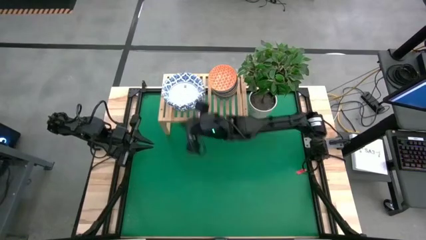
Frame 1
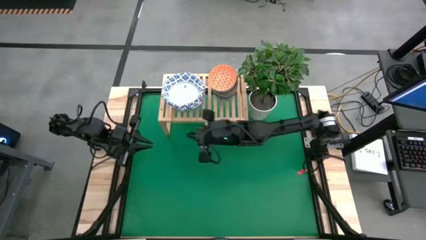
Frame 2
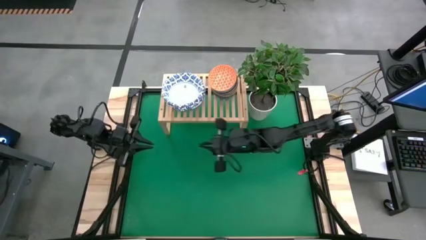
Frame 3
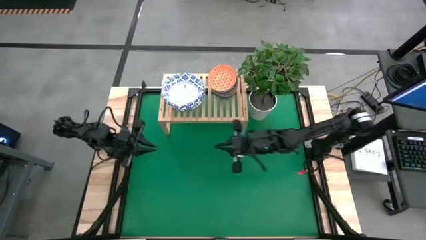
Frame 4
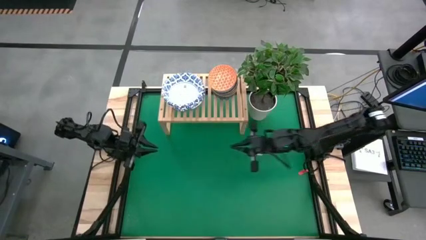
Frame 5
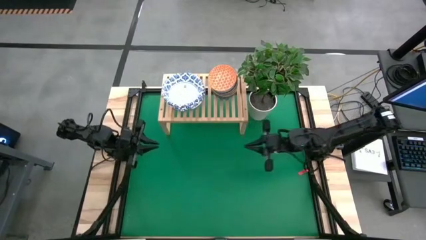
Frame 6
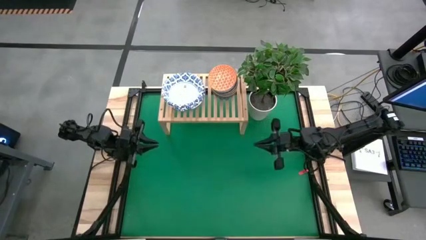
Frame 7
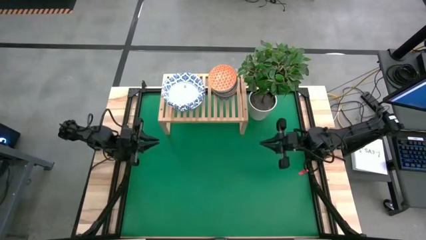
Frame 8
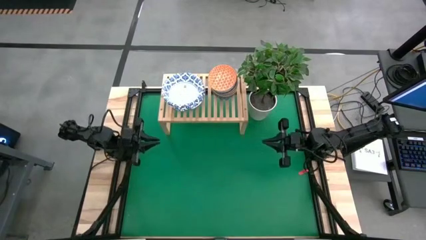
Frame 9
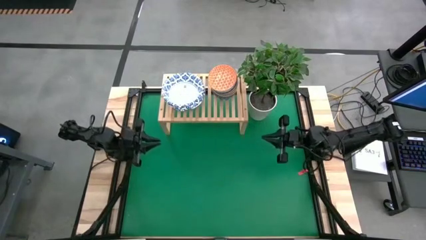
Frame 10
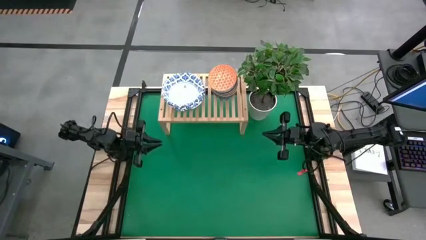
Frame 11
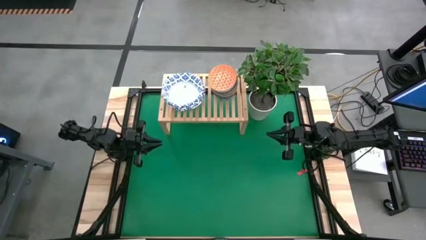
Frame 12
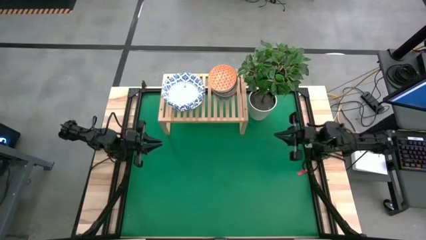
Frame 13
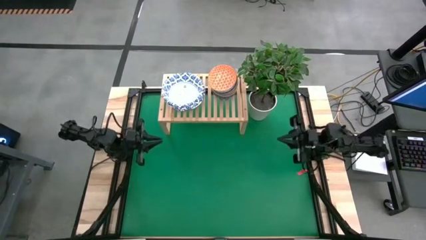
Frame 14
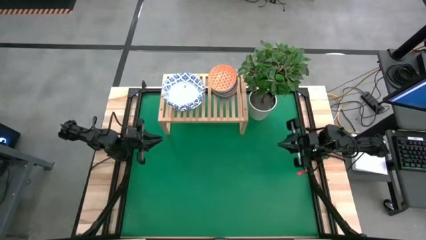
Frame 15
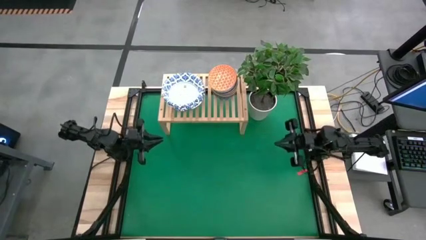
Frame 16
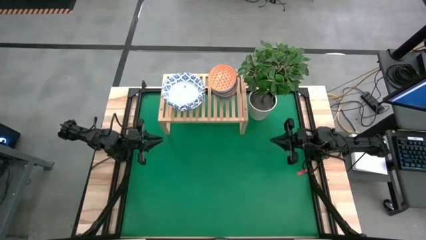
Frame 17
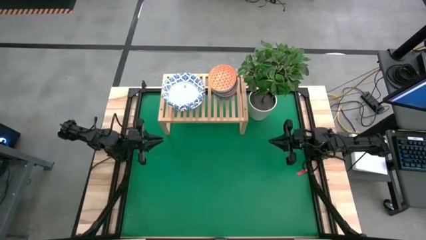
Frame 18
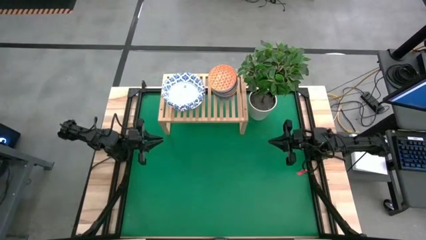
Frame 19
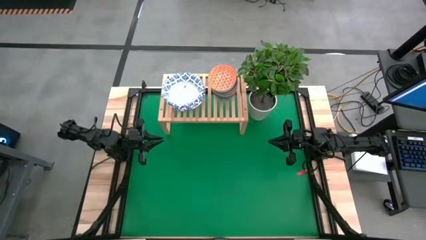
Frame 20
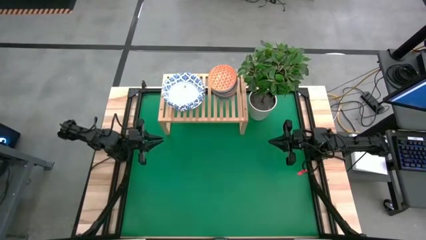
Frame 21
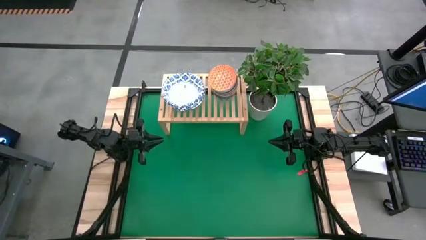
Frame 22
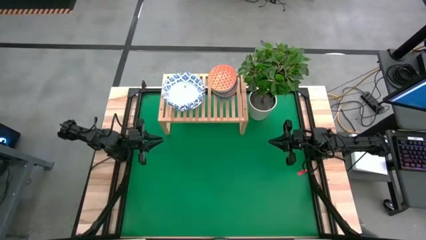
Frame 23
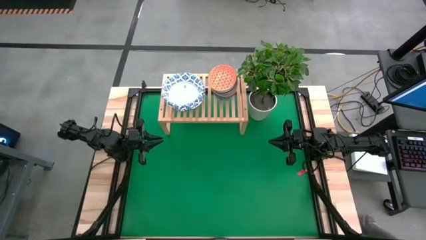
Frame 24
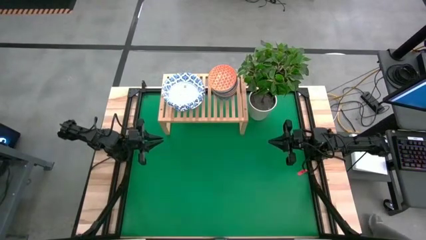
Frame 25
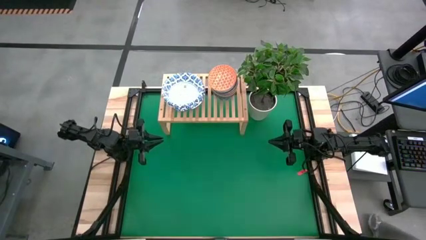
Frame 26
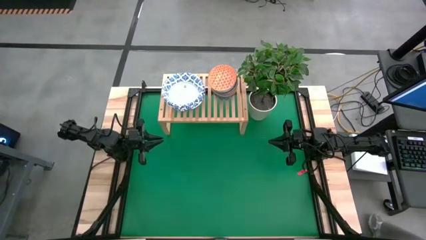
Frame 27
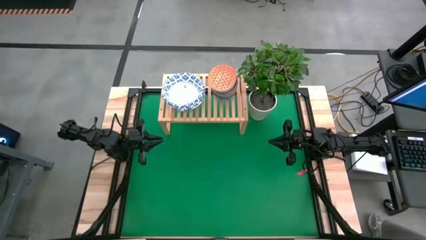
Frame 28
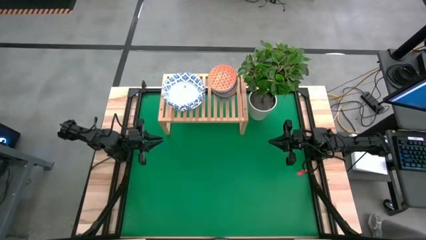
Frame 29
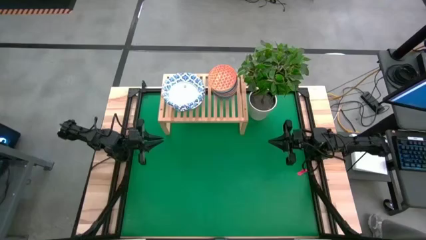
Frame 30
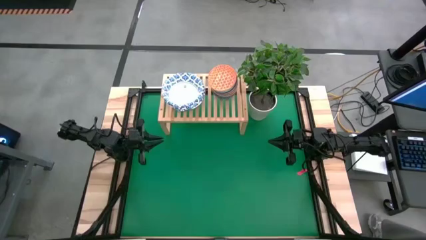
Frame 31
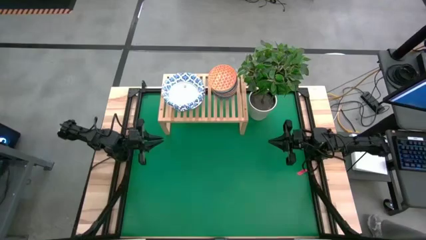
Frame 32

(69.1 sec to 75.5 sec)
Task: Place and stack bowls onto a shelf
Return to Home Position

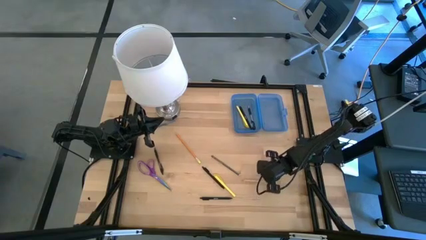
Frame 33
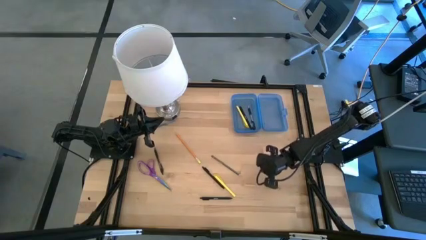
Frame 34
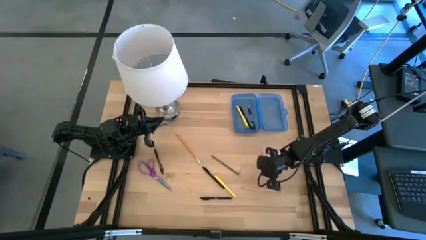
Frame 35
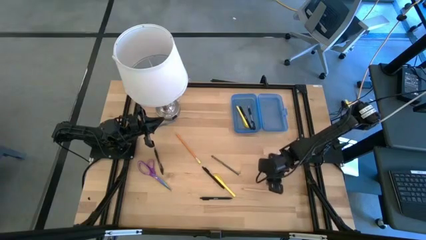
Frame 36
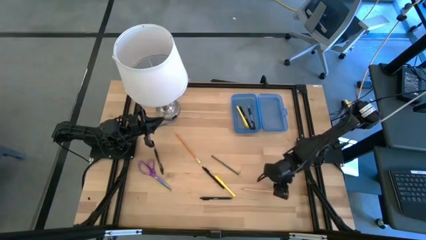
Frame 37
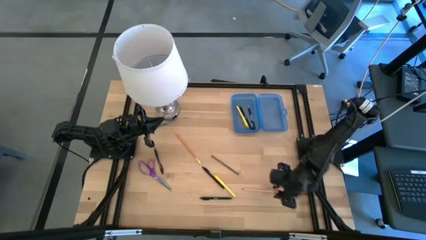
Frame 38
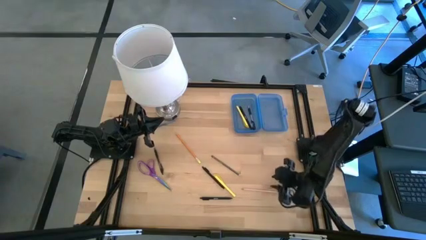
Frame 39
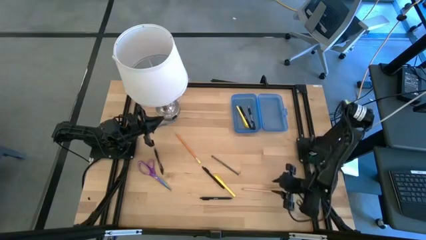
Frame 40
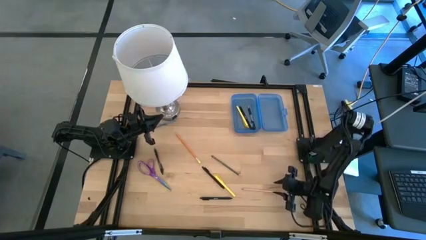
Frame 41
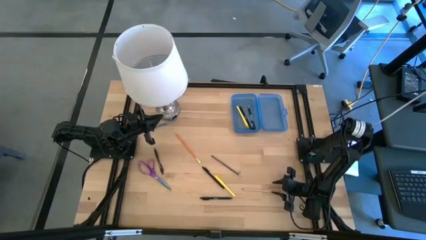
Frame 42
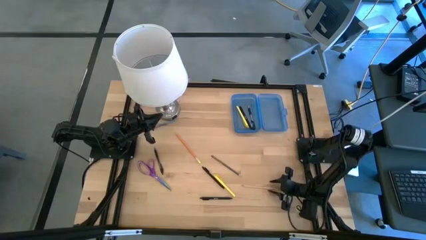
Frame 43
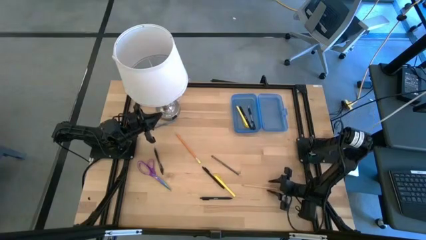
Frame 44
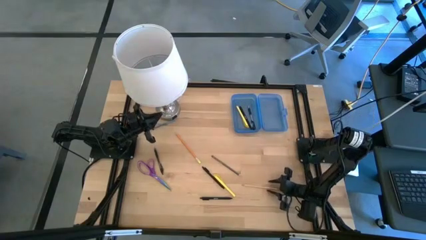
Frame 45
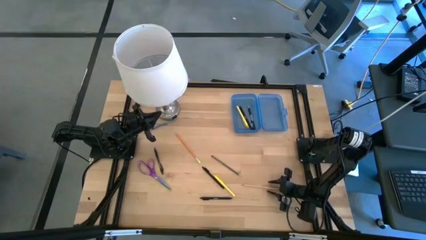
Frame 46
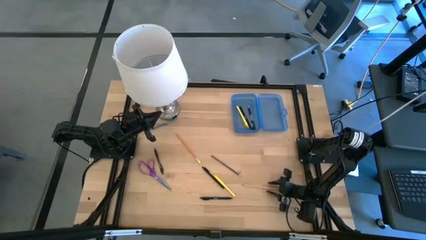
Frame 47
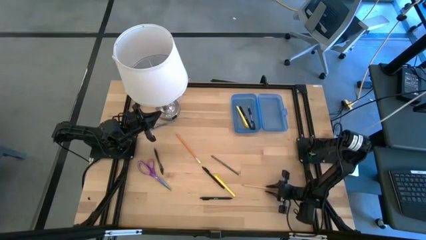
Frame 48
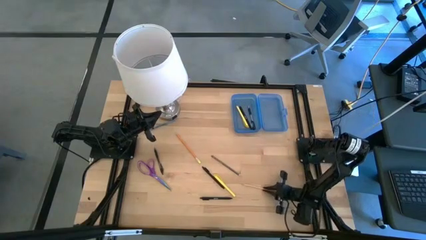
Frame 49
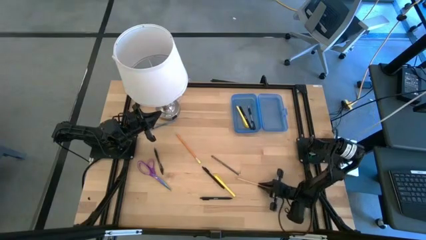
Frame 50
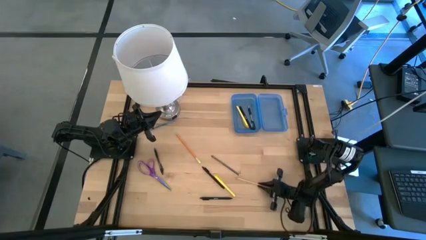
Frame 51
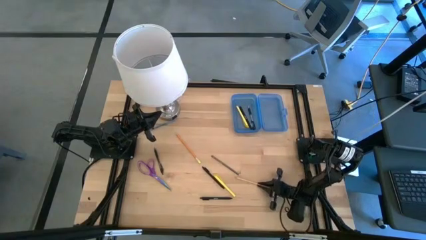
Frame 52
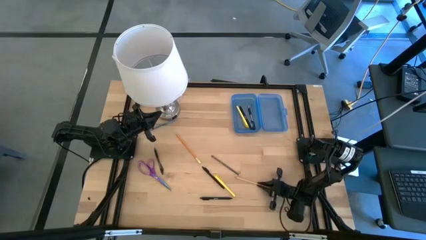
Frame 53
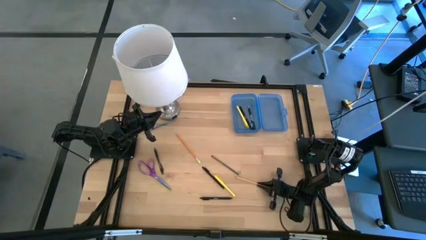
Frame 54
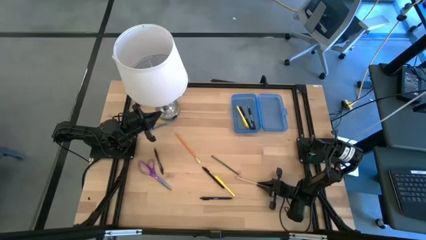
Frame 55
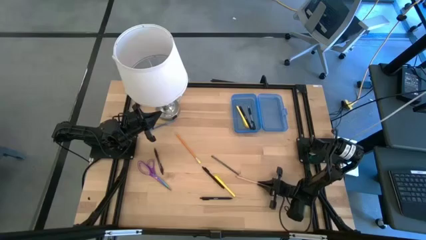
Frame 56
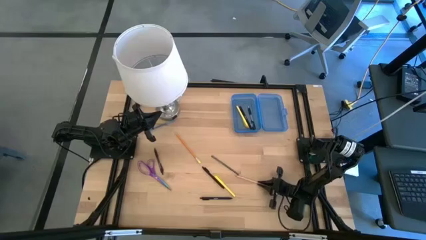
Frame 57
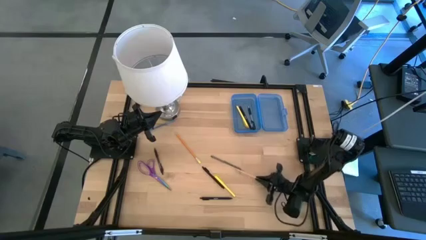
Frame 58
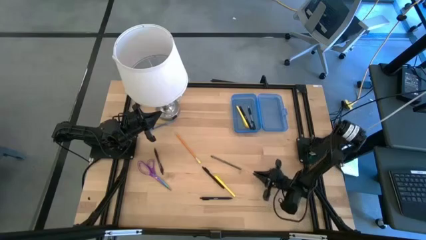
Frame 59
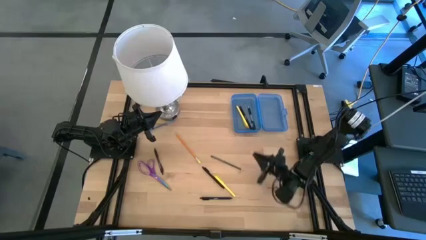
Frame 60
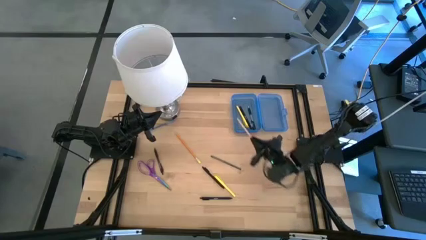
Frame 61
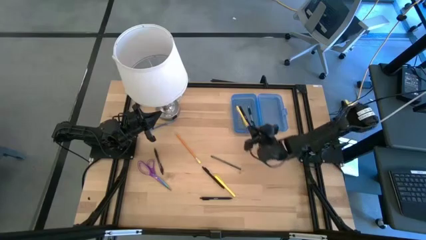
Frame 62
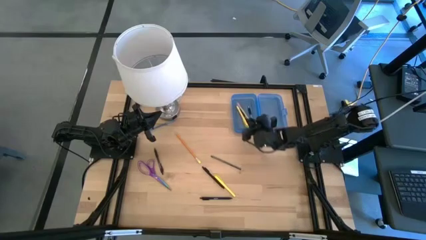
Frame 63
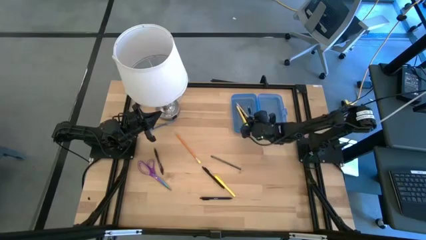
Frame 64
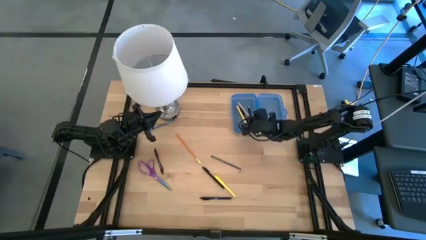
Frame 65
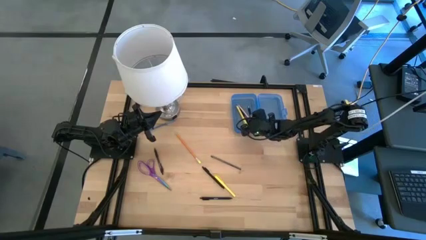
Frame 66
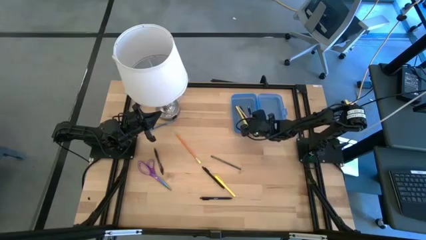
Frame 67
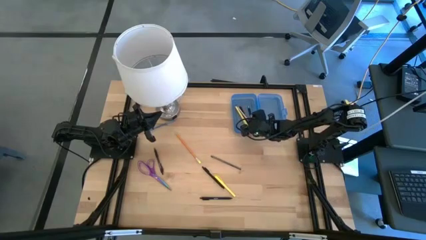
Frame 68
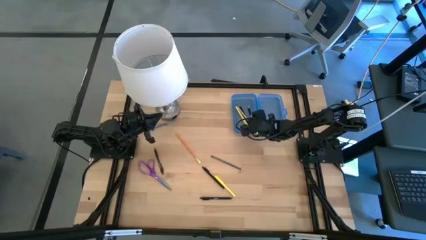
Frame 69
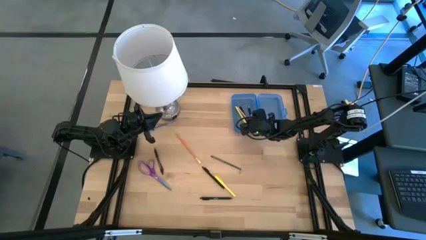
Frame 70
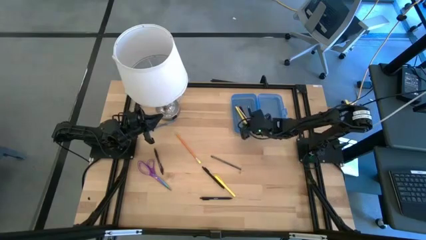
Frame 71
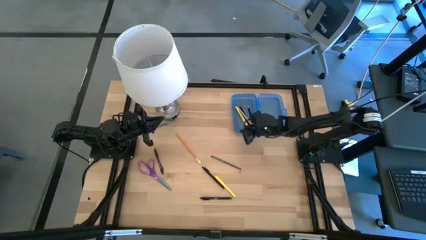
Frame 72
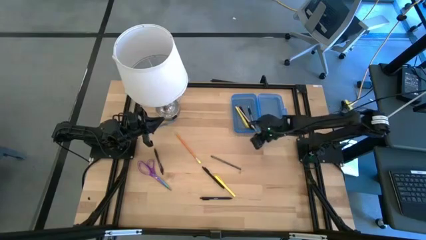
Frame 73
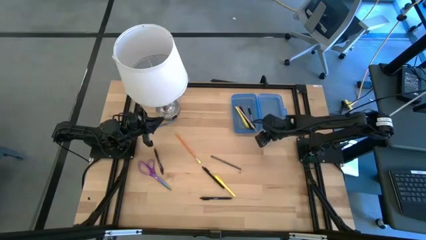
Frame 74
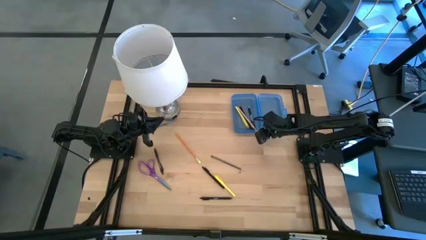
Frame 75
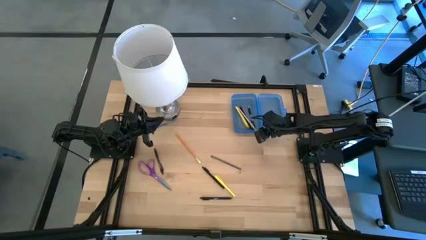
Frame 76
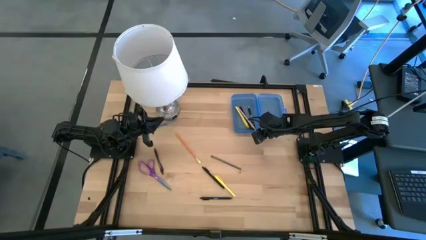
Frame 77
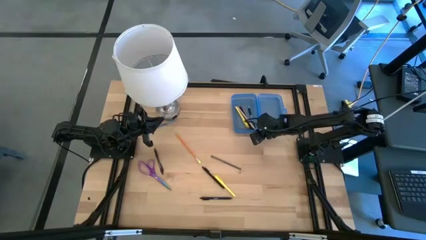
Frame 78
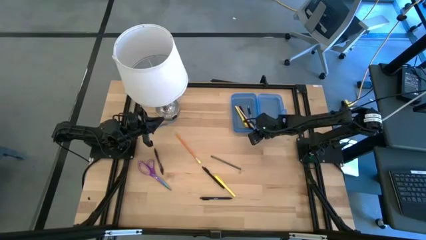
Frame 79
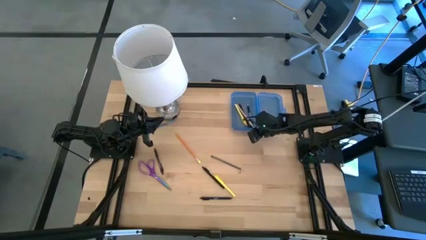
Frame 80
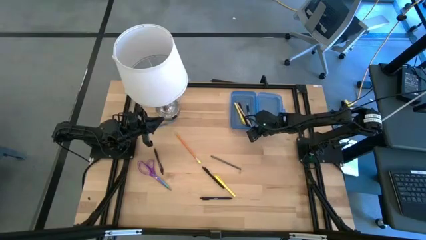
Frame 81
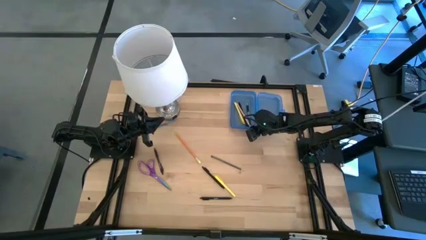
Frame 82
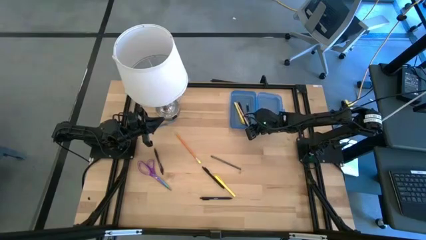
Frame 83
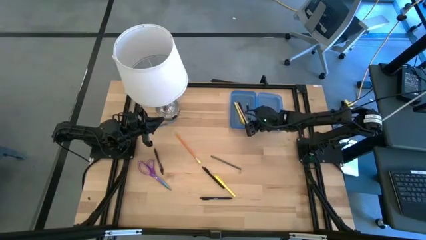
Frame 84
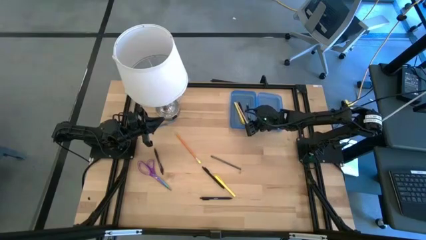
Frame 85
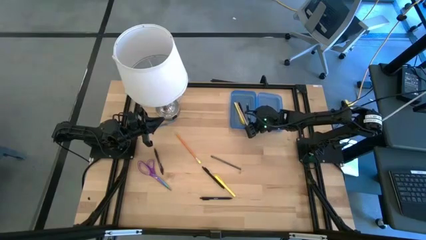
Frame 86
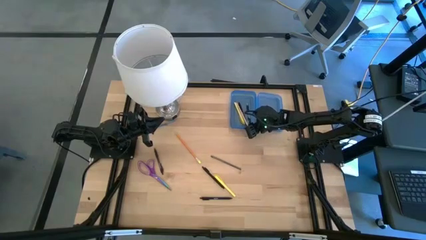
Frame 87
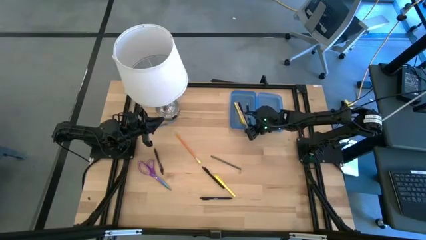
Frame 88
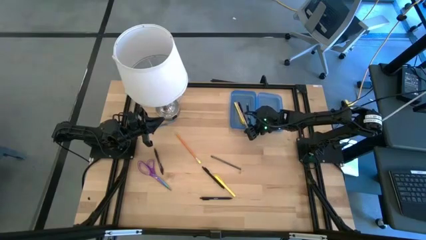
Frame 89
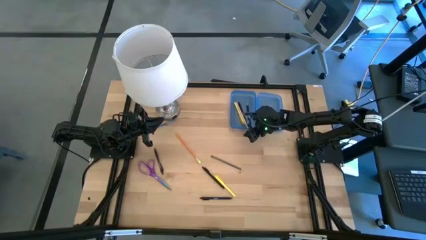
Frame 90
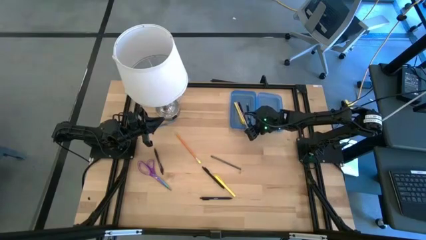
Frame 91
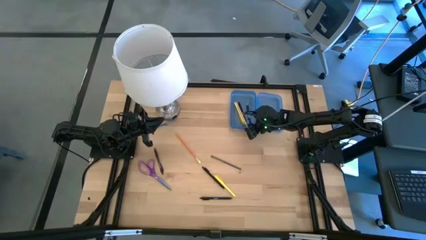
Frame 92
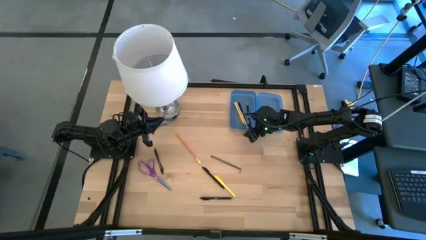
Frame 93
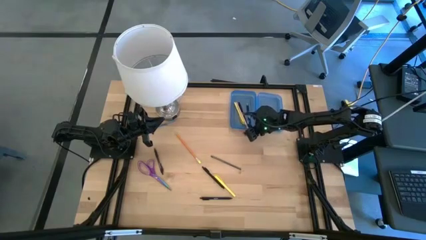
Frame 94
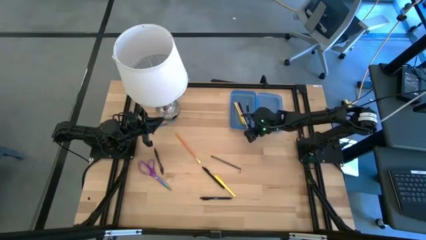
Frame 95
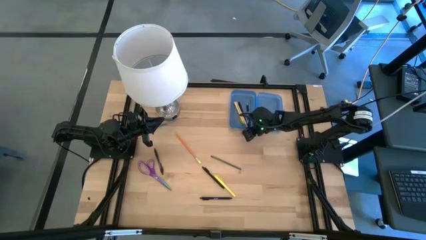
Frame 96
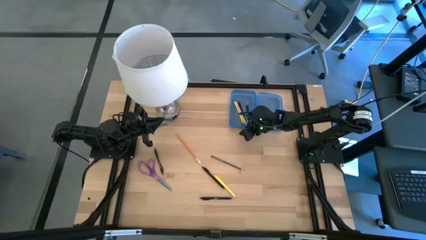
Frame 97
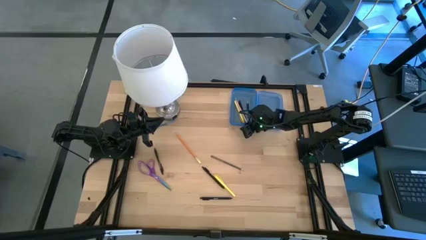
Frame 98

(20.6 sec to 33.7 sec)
Task: Pick & place school supplies into a supply box
Put the pink pencil into the blue supply box
